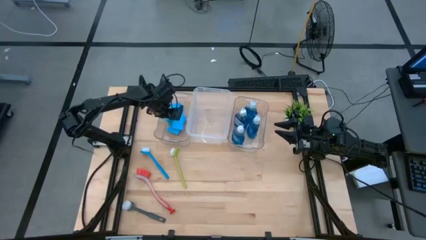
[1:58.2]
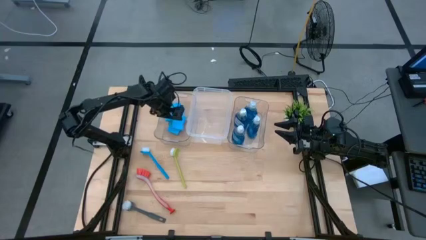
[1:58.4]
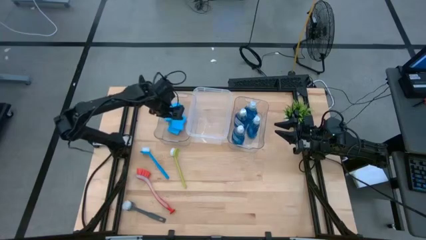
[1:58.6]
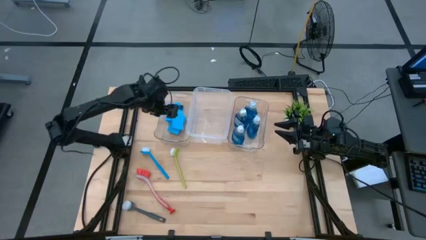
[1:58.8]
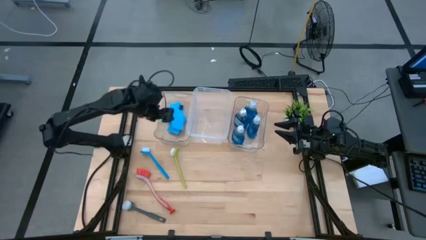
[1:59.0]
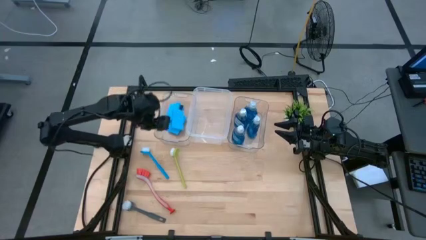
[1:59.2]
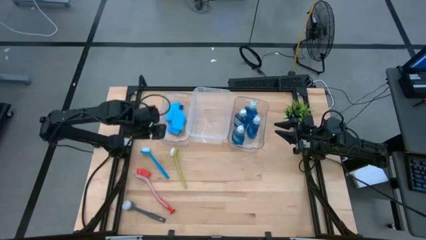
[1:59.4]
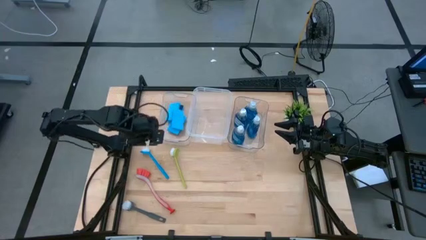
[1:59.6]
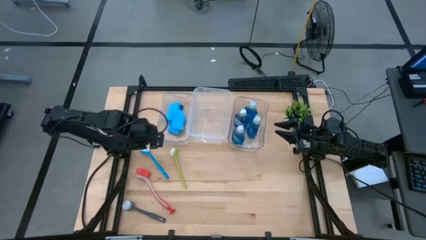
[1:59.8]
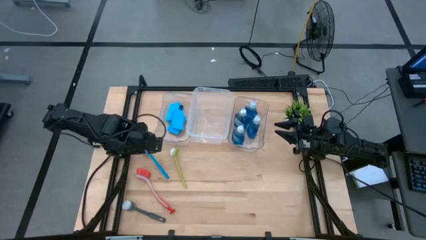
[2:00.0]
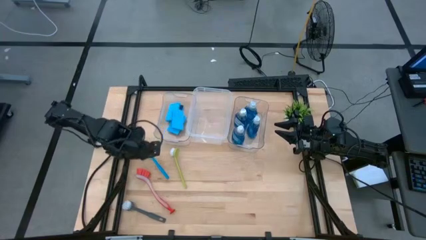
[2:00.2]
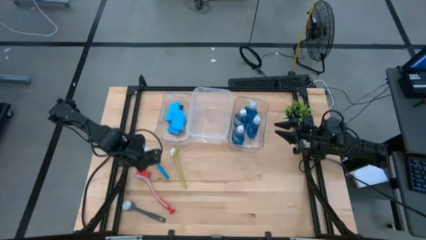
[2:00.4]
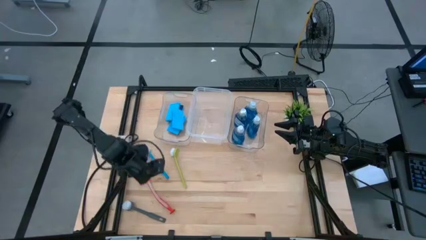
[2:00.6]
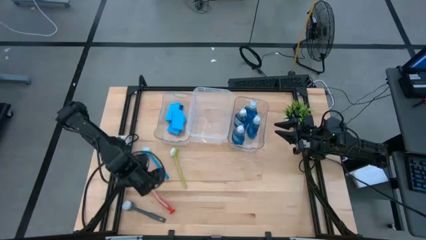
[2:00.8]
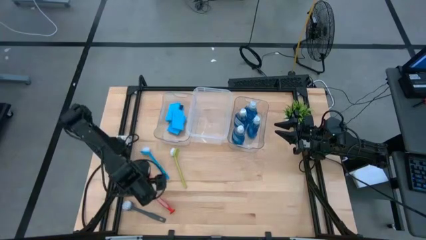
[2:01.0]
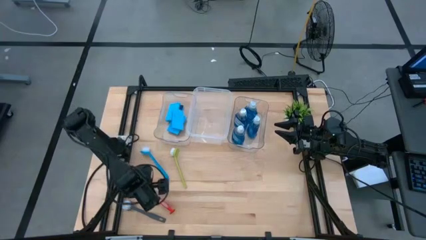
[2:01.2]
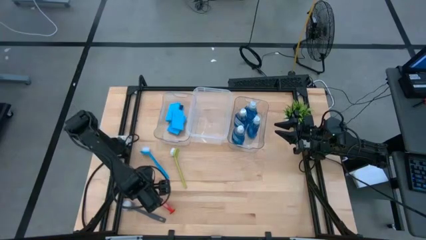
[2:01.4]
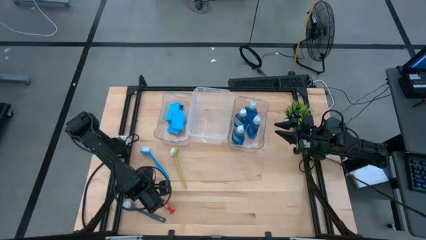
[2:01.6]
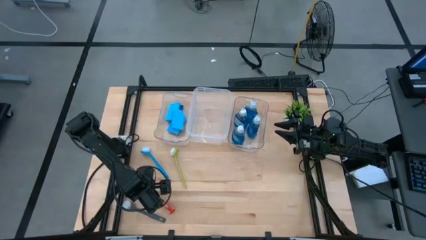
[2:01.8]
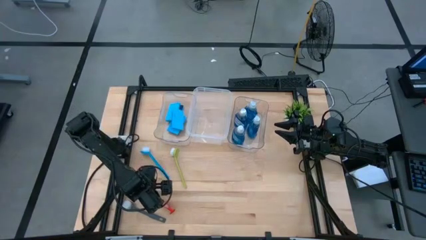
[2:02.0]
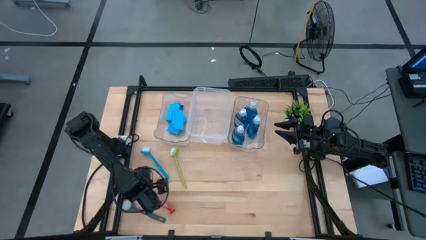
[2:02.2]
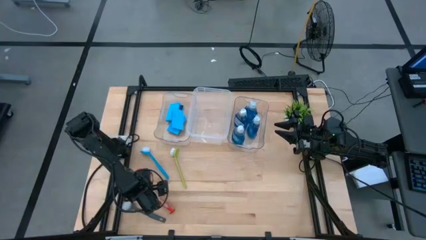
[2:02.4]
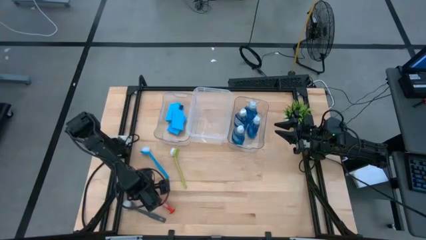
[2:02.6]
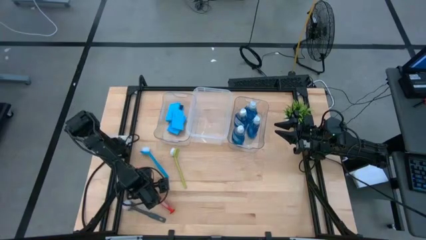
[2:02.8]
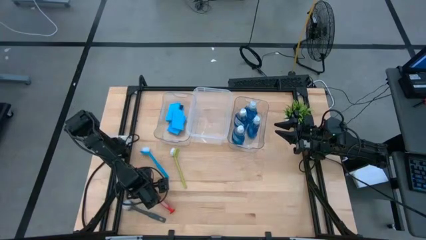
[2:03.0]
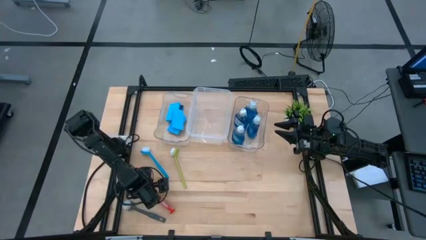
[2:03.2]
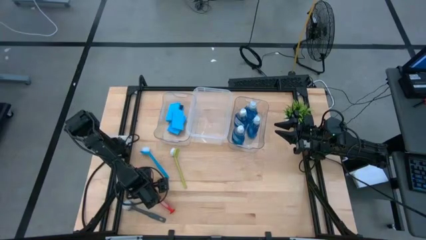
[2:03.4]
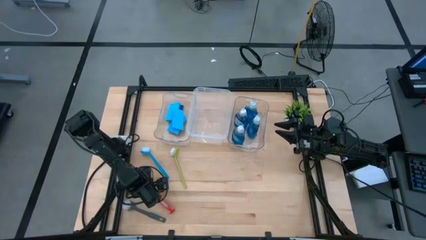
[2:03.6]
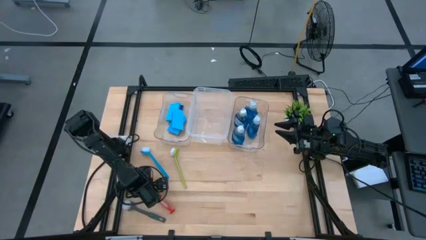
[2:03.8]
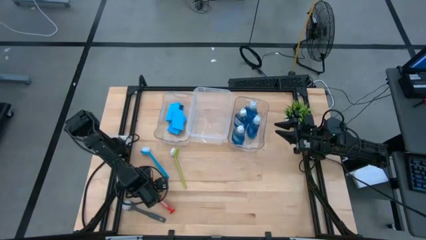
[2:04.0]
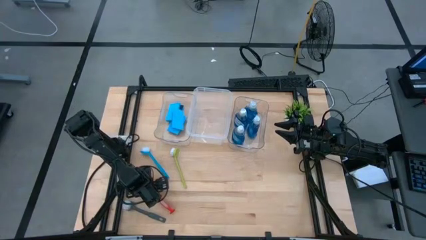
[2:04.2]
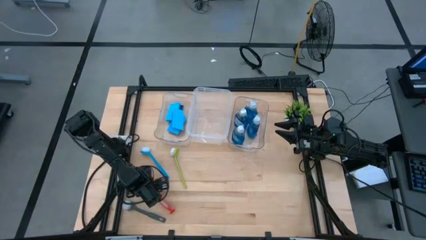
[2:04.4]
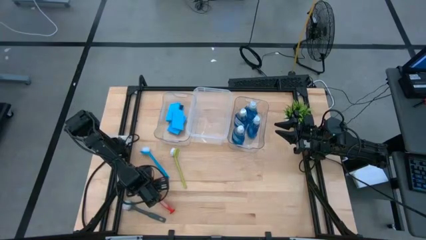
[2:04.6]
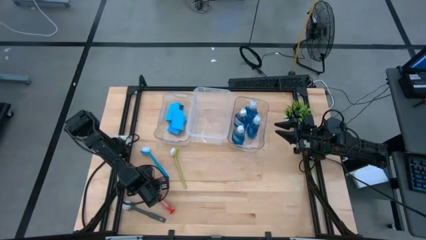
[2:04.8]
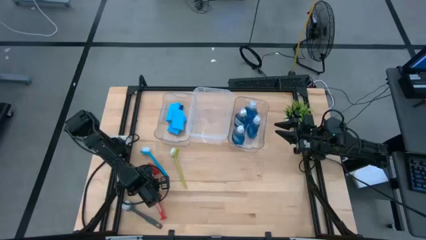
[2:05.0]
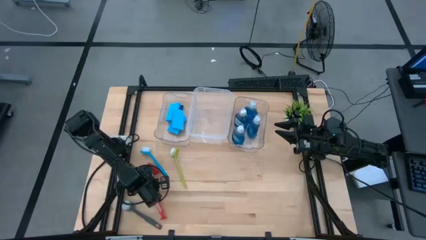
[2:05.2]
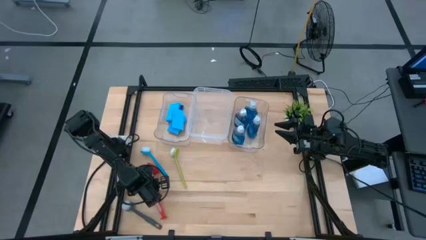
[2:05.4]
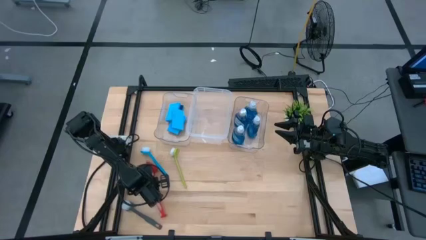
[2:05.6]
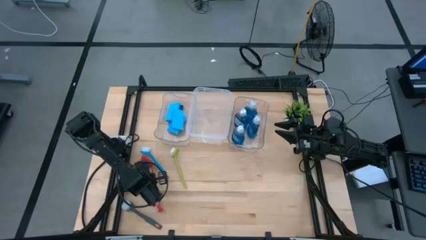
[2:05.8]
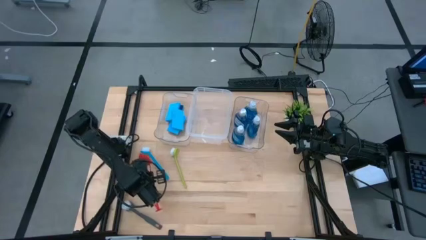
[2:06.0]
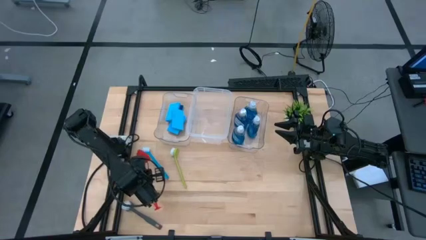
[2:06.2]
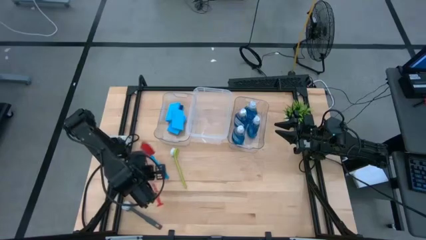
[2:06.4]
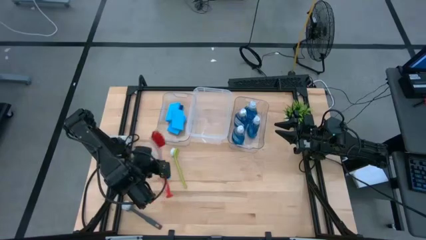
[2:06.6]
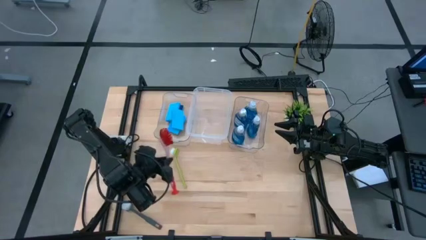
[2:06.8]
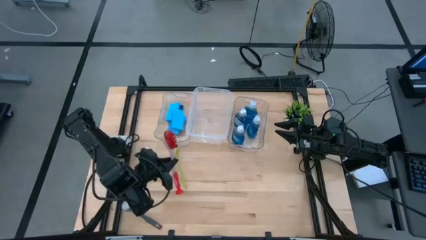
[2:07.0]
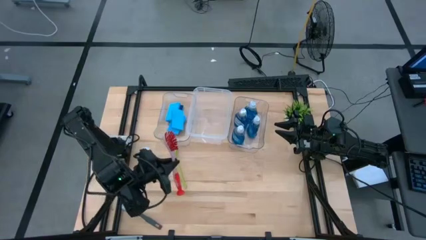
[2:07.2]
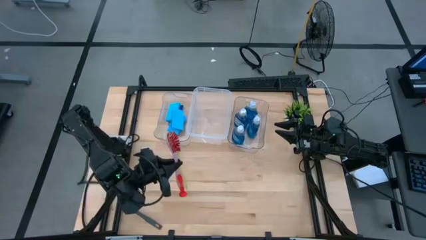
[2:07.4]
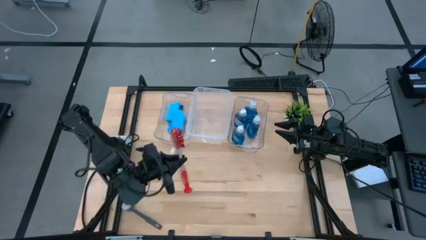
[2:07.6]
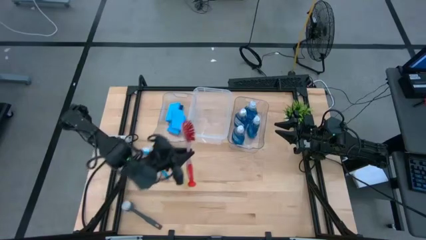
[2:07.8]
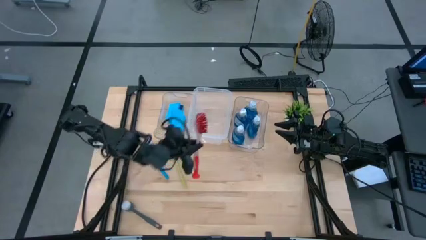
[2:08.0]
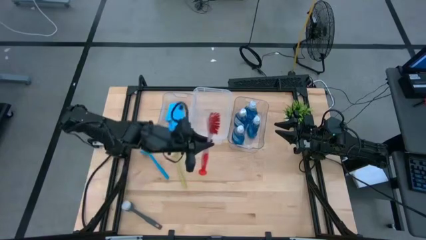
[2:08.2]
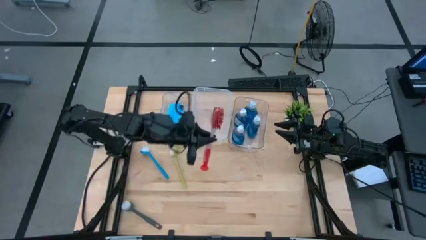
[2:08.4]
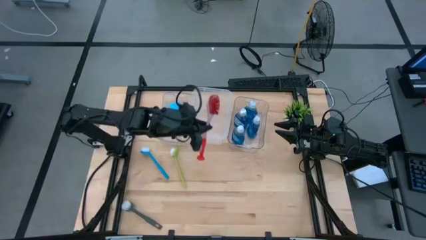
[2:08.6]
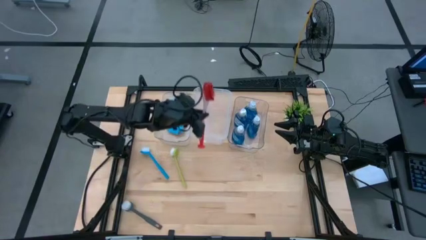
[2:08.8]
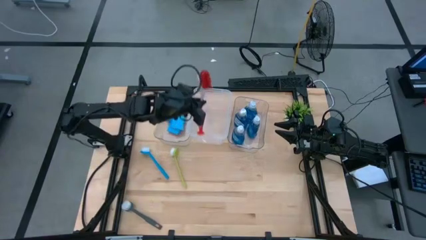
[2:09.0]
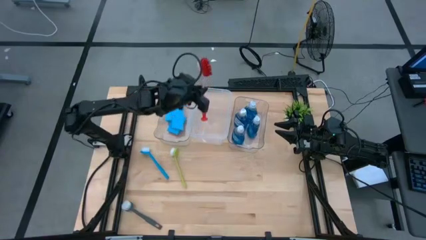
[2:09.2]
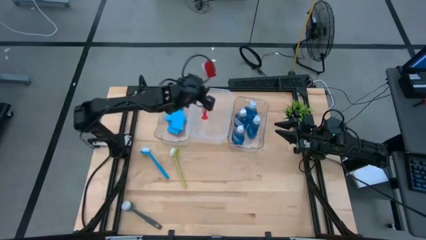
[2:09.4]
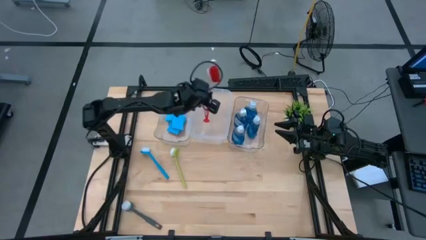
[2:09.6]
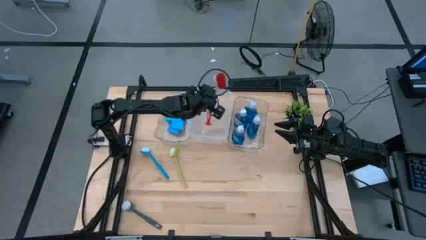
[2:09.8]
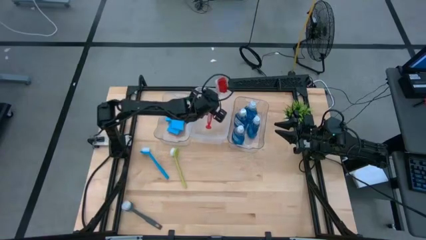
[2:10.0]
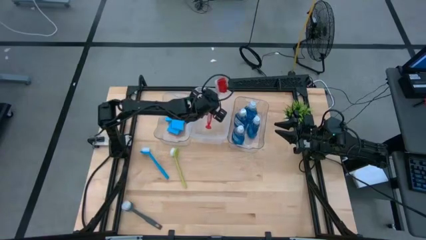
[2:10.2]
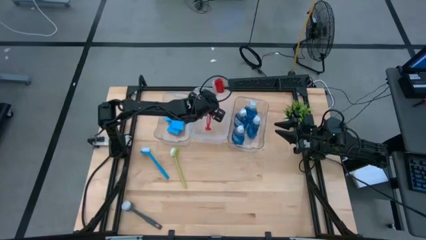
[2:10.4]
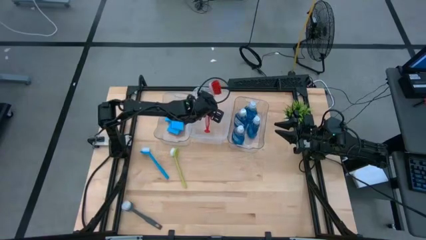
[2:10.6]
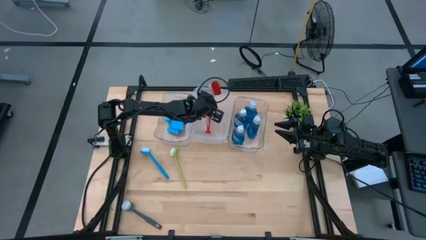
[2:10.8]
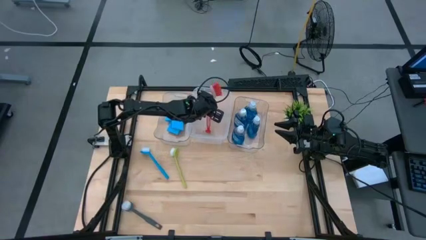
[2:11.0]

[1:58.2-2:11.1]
Task: Pick & Place Kitchen Sink Supplies
Put the red dish brush into the middle transparent bin
